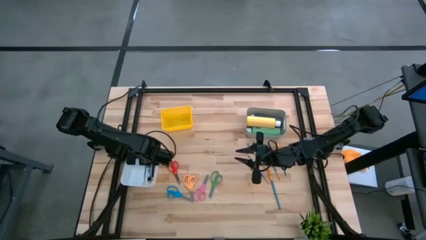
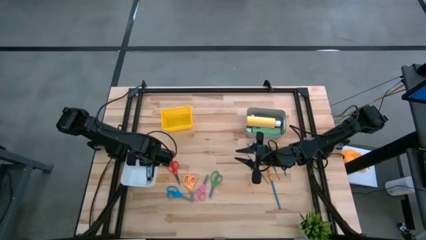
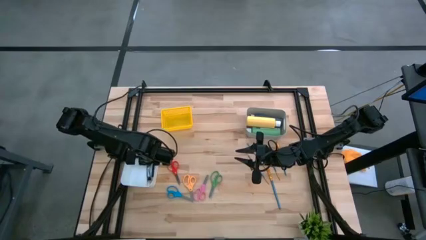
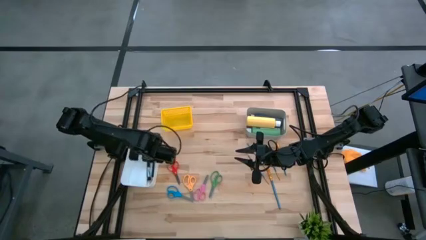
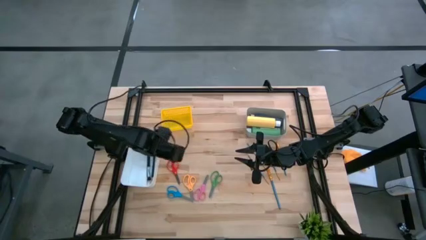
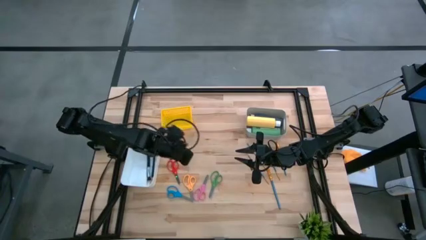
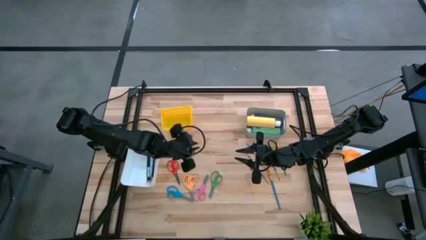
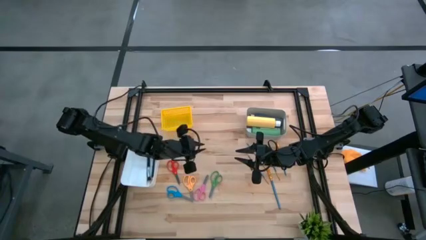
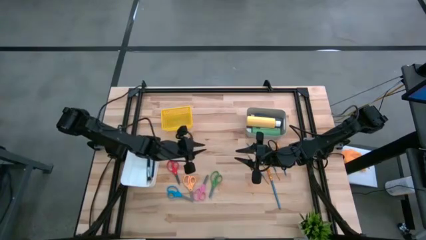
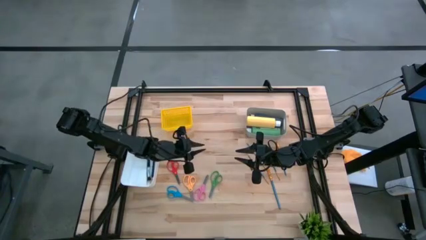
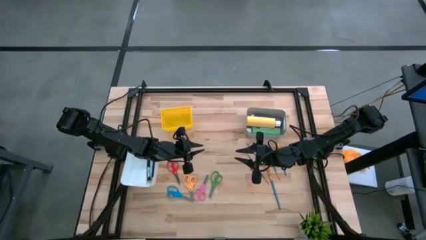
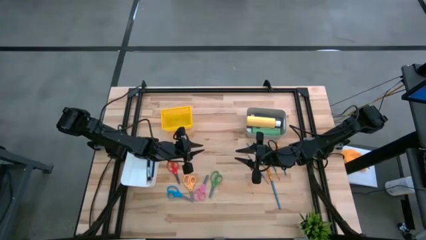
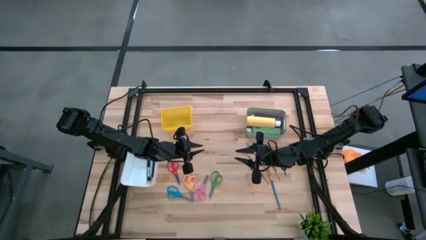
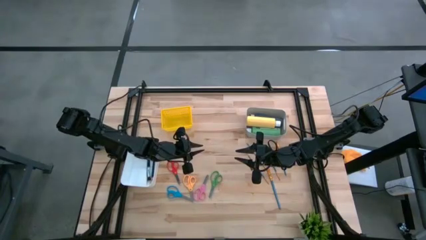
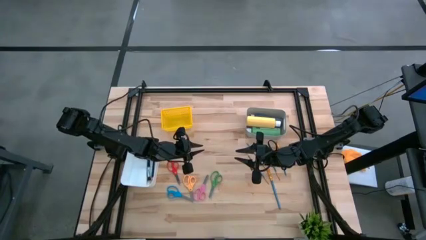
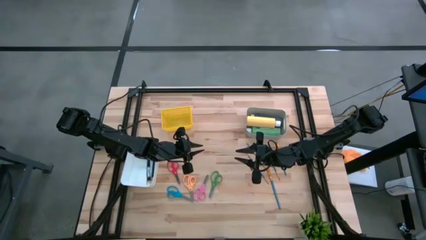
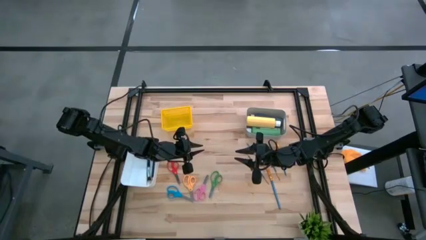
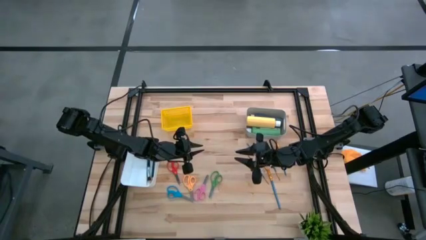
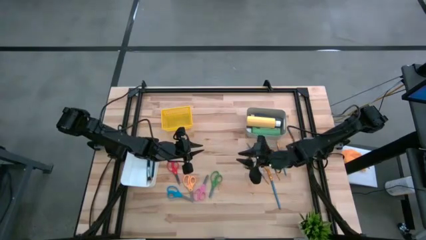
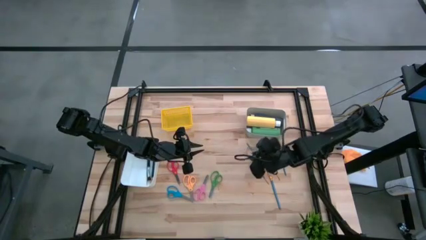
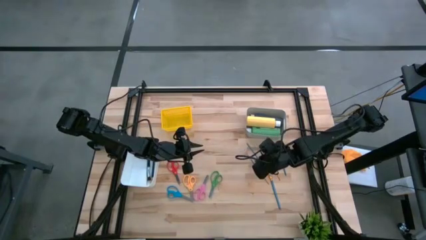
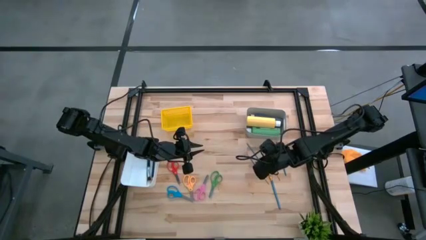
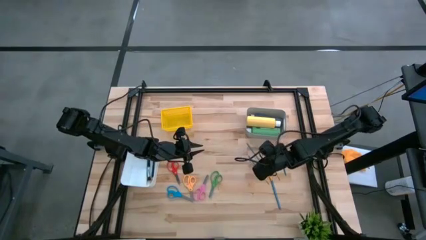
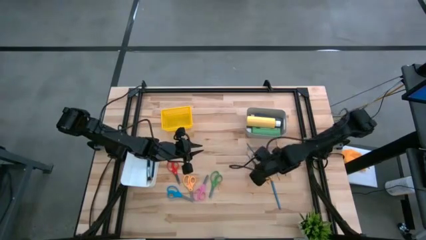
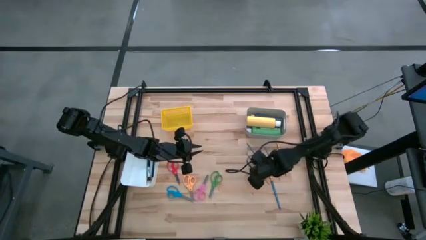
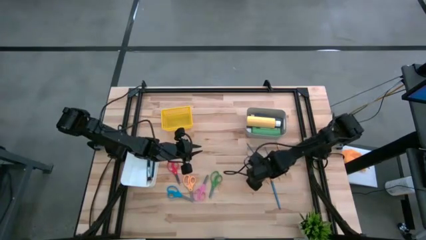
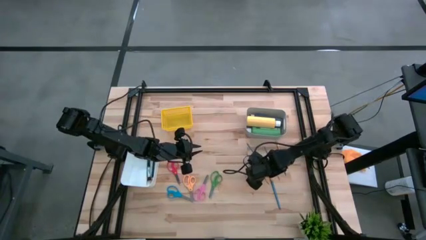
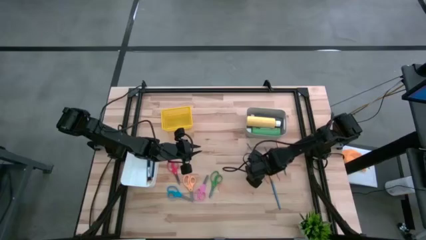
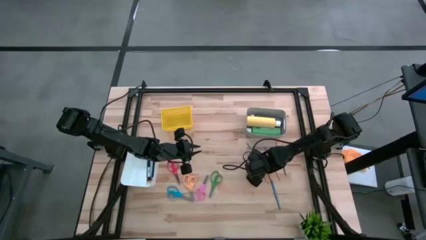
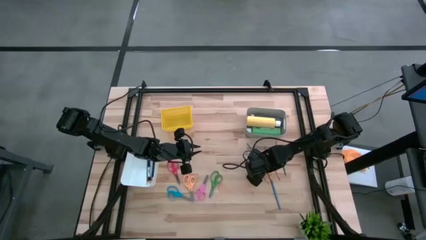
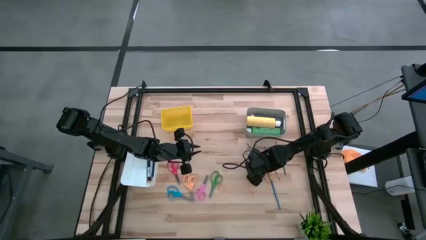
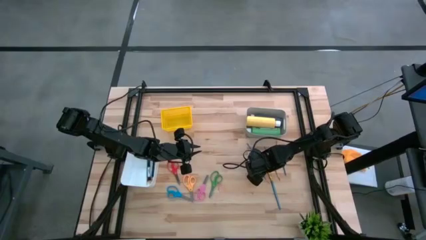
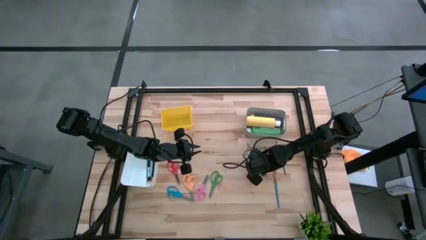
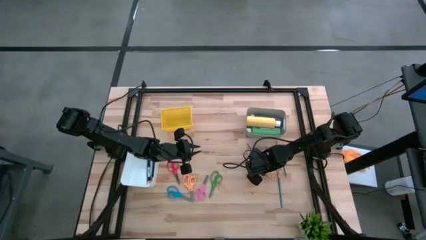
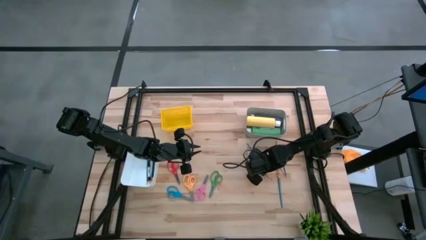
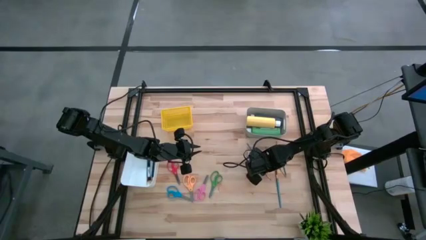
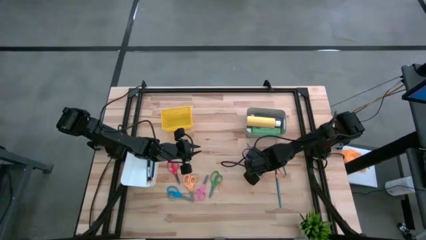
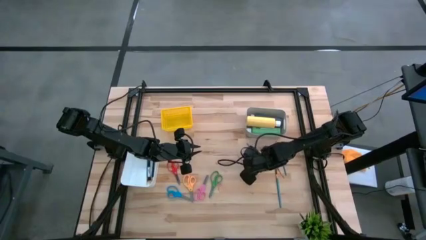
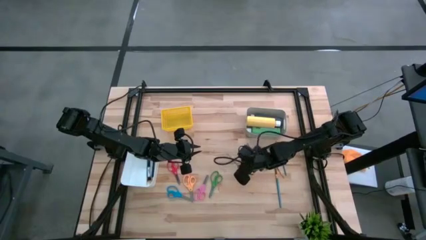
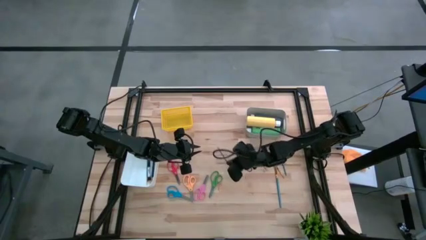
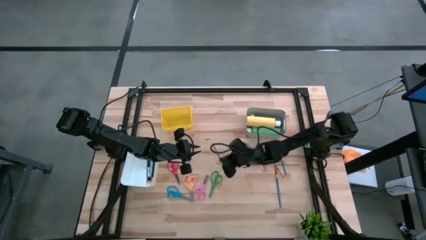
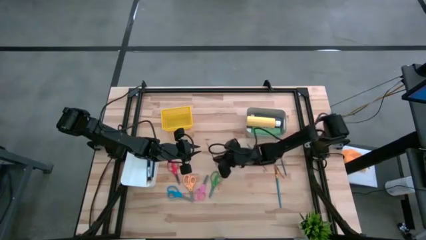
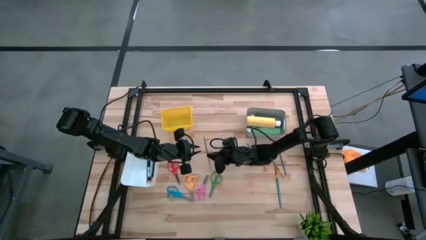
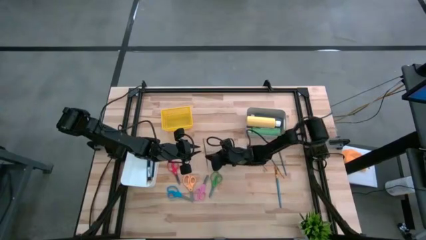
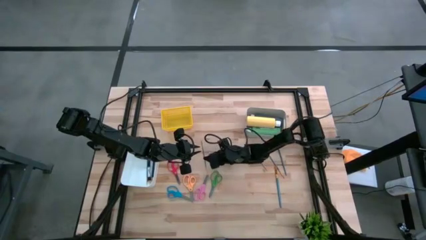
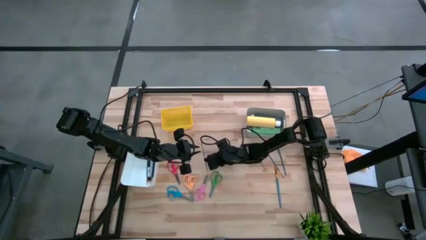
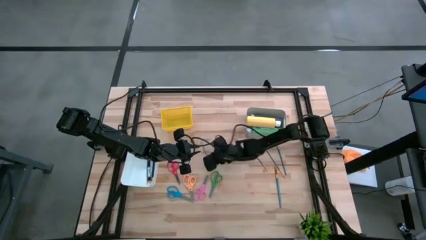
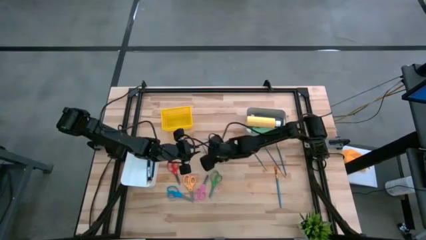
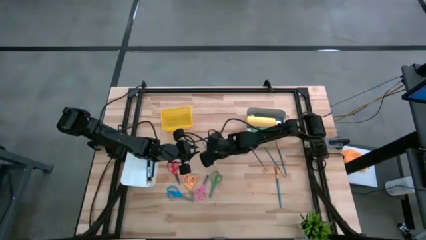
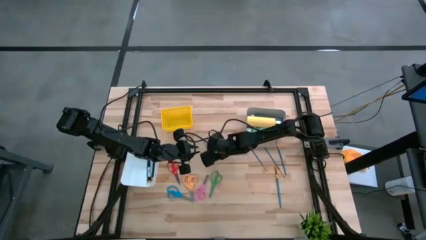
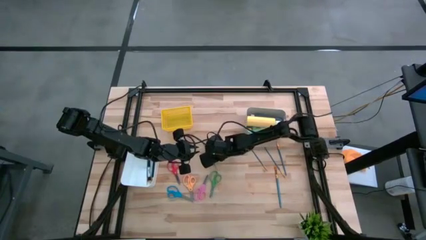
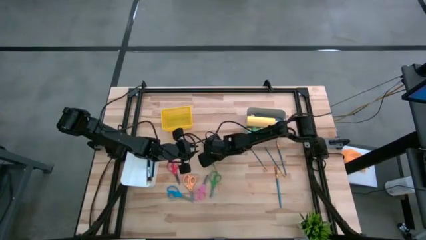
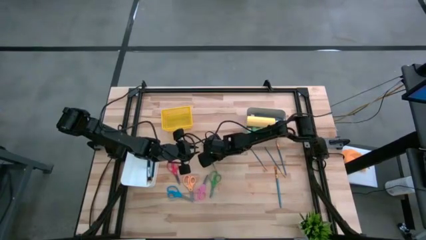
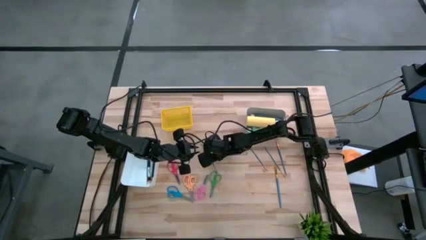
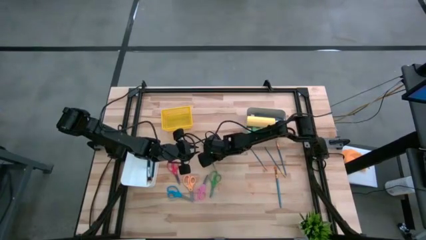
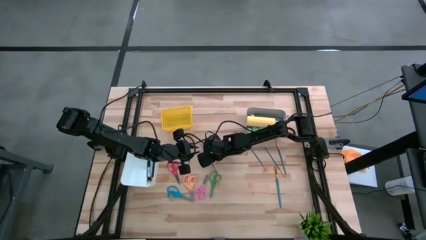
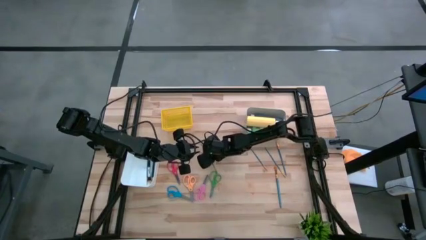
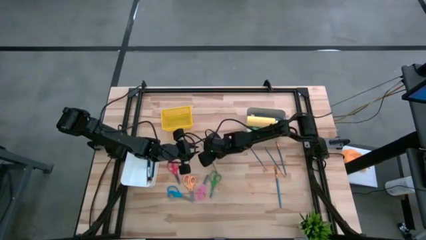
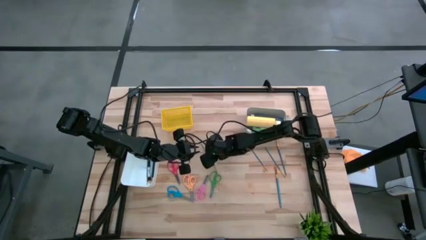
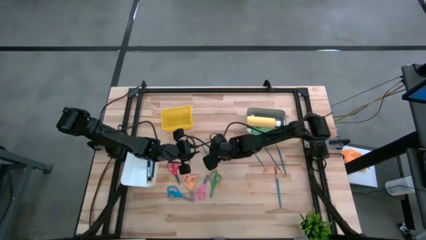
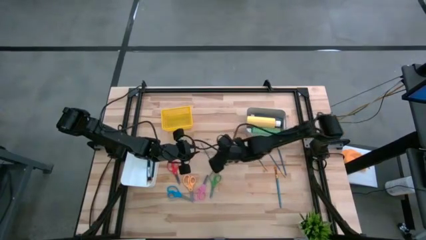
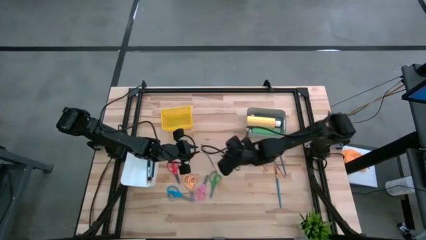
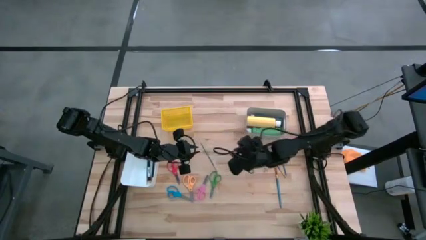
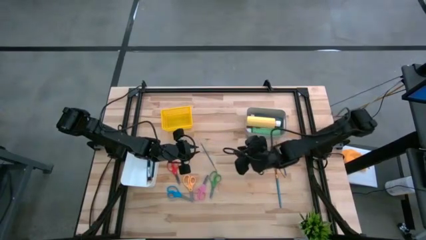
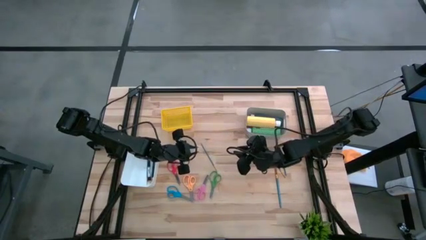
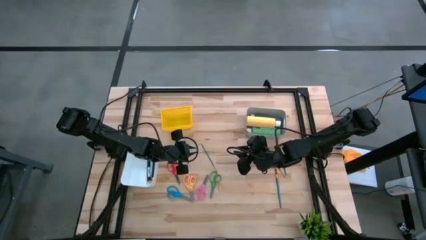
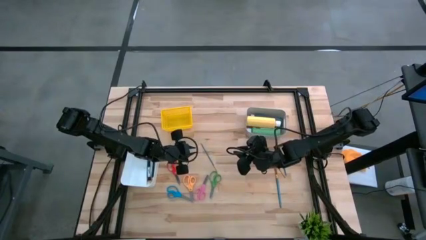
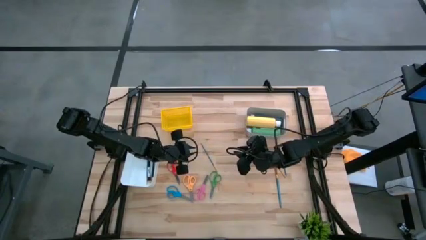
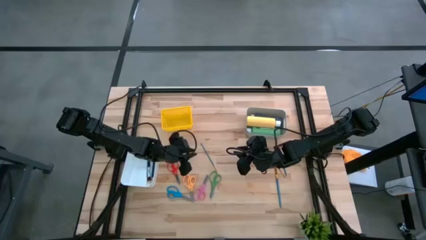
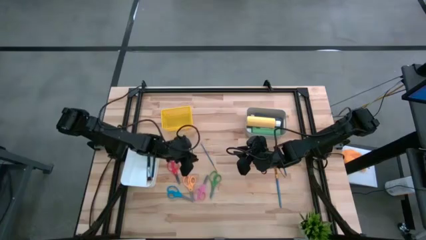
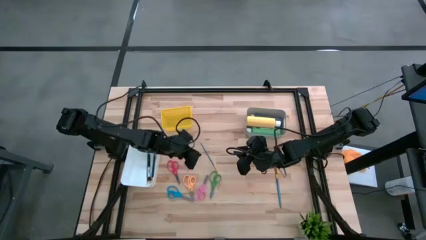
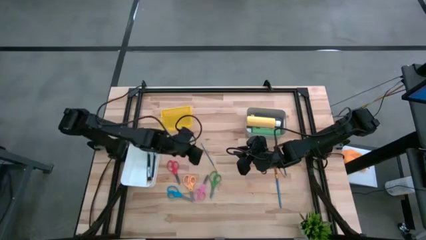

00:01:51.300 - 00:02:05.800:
Task: Pick & Place Paint Supplies
Put the blue paintbrush into the white bin
